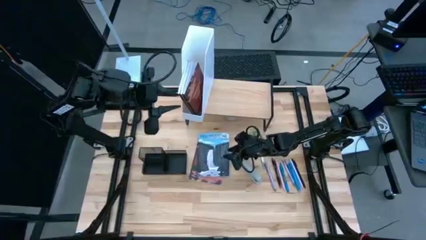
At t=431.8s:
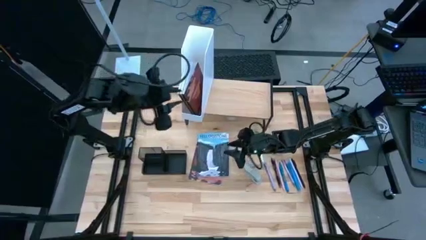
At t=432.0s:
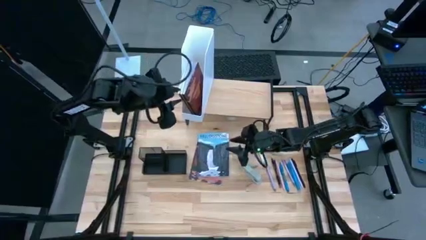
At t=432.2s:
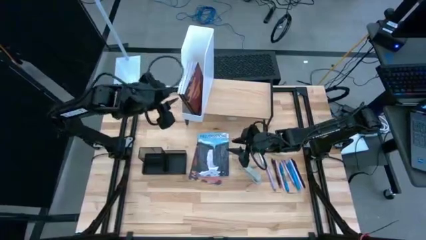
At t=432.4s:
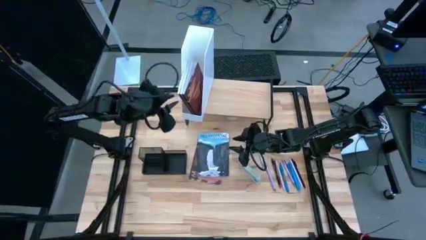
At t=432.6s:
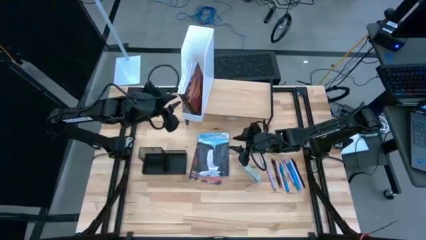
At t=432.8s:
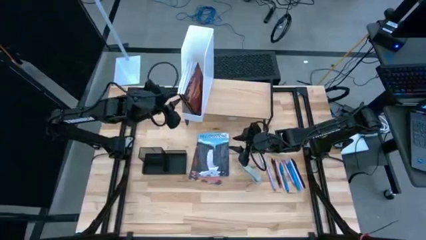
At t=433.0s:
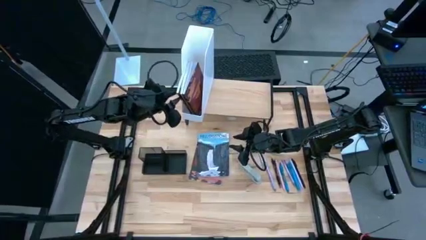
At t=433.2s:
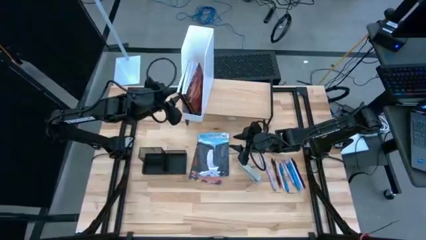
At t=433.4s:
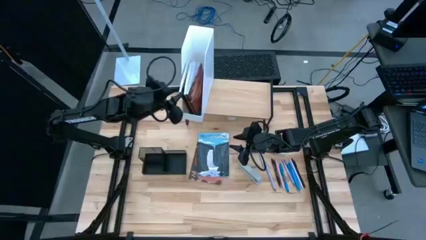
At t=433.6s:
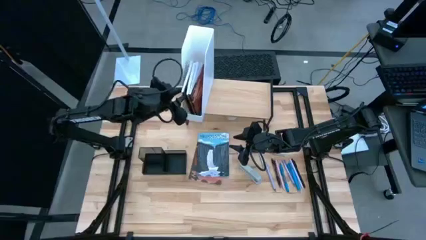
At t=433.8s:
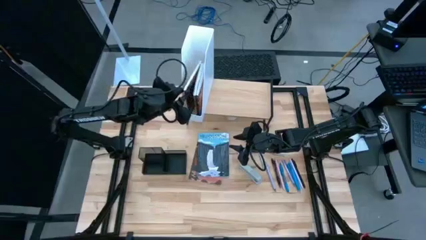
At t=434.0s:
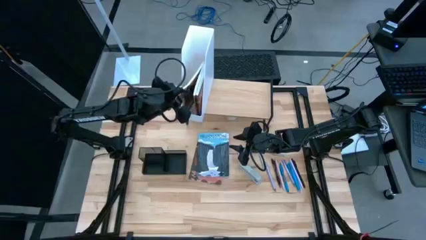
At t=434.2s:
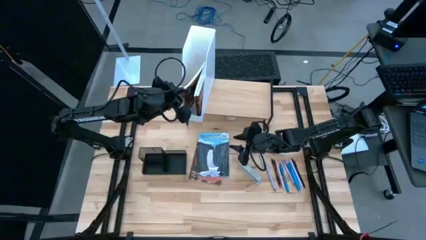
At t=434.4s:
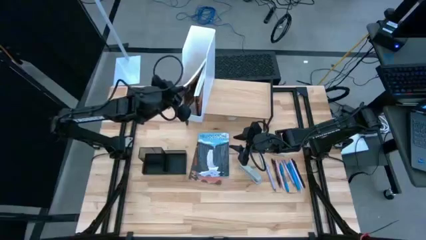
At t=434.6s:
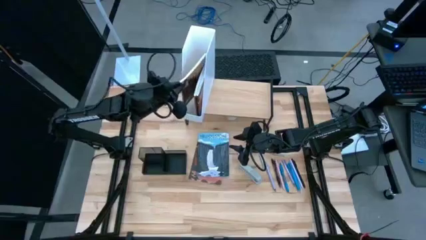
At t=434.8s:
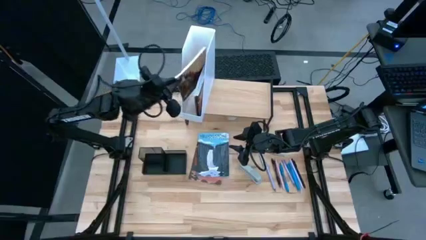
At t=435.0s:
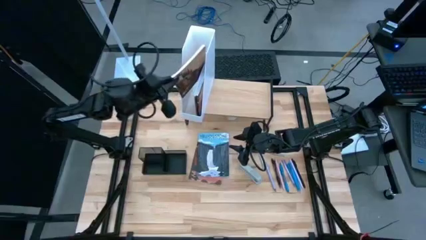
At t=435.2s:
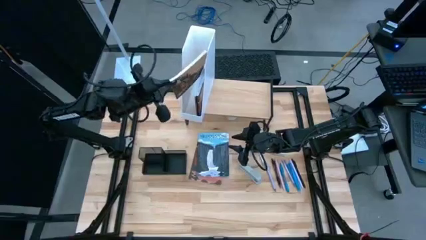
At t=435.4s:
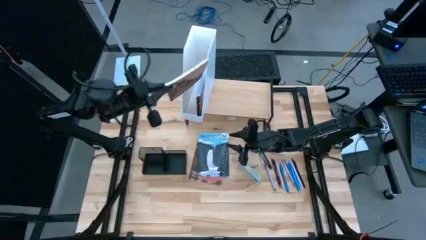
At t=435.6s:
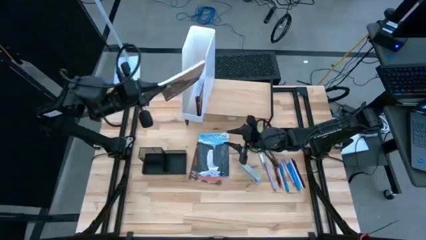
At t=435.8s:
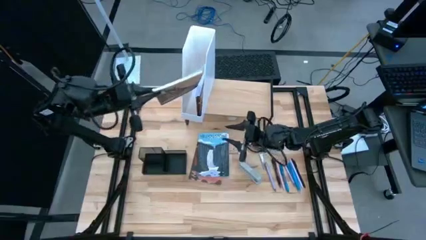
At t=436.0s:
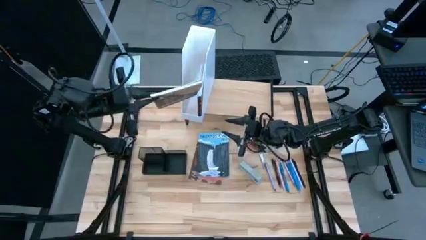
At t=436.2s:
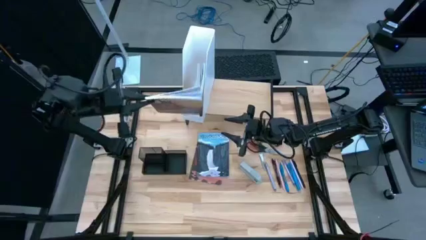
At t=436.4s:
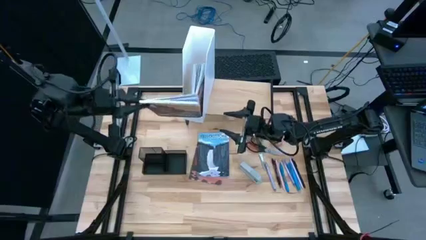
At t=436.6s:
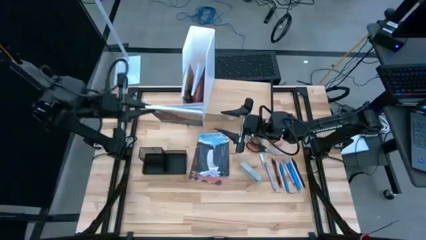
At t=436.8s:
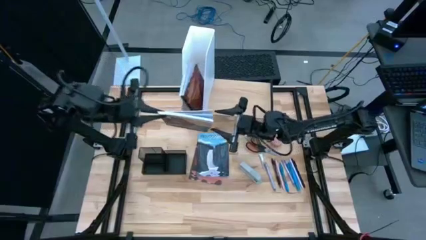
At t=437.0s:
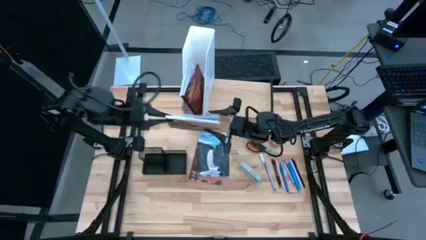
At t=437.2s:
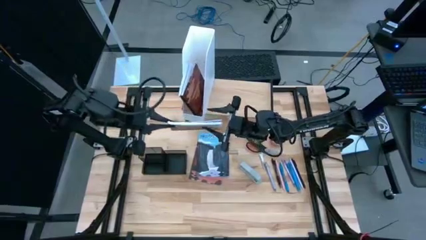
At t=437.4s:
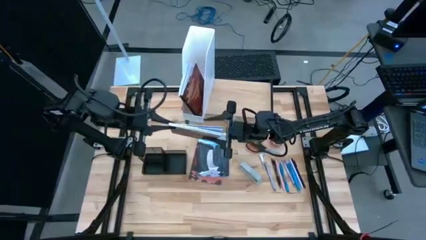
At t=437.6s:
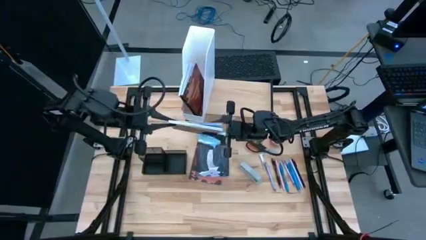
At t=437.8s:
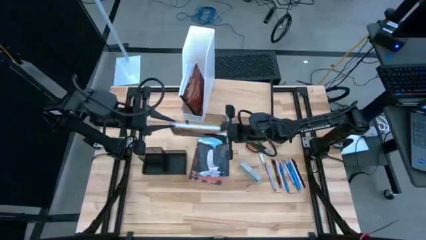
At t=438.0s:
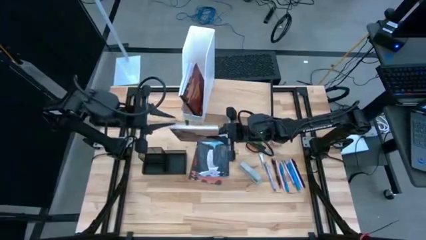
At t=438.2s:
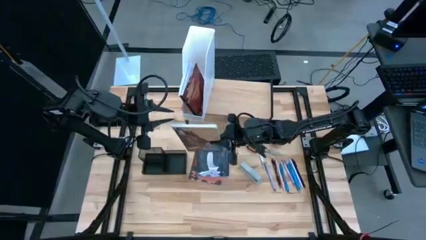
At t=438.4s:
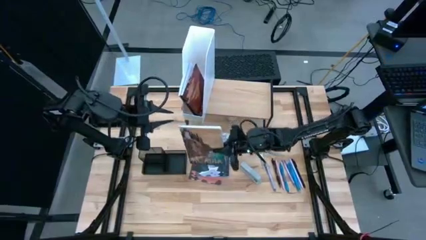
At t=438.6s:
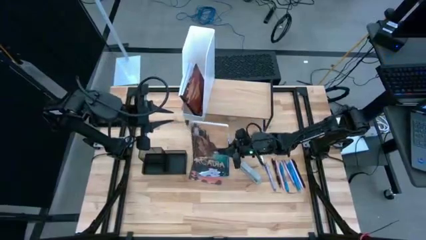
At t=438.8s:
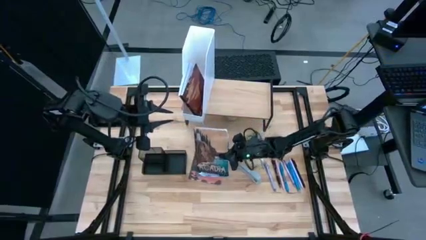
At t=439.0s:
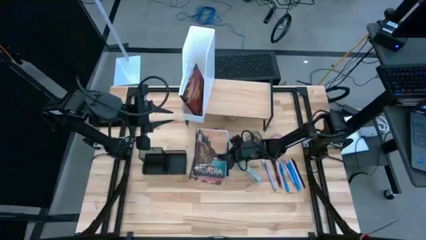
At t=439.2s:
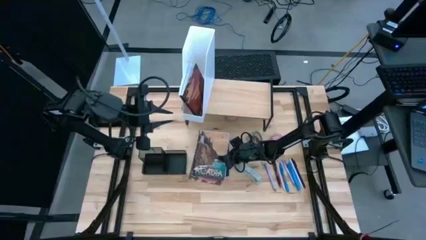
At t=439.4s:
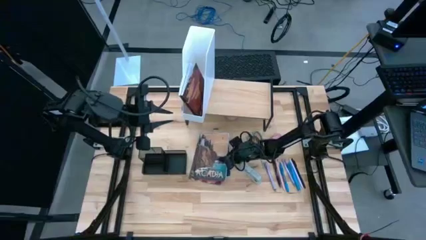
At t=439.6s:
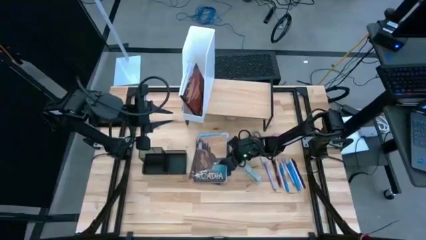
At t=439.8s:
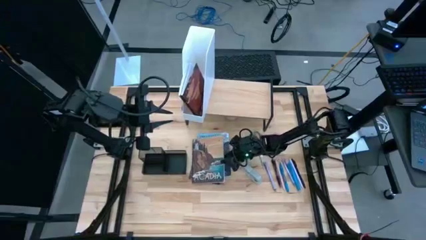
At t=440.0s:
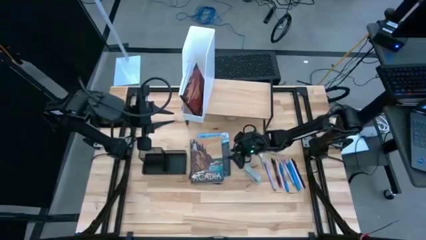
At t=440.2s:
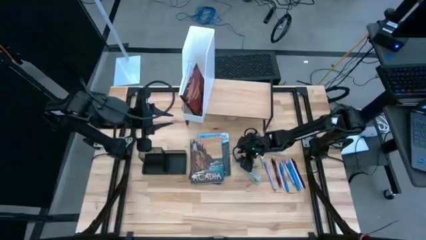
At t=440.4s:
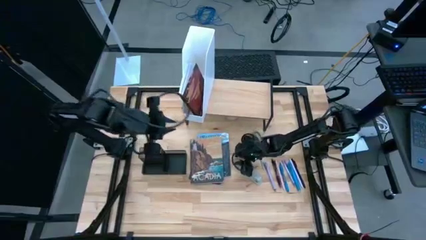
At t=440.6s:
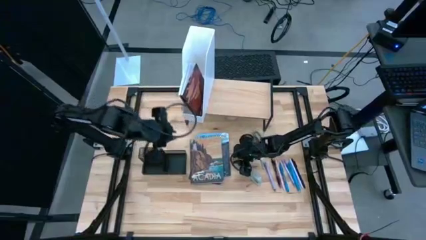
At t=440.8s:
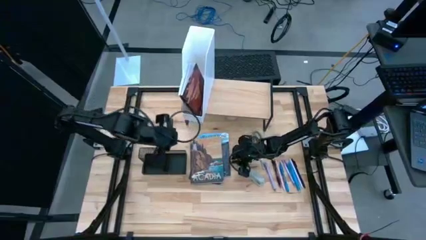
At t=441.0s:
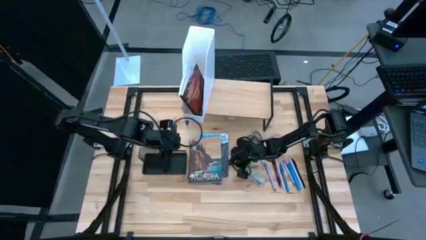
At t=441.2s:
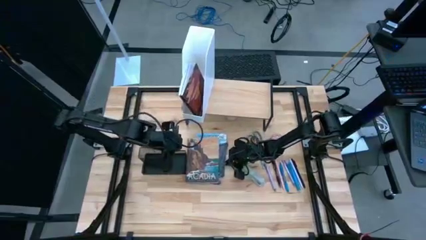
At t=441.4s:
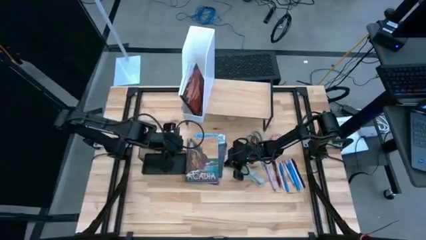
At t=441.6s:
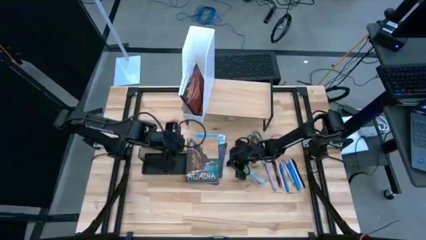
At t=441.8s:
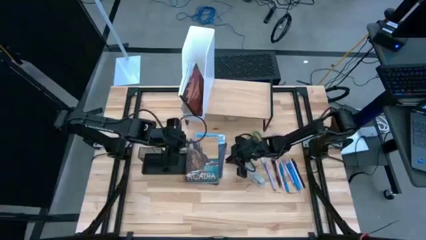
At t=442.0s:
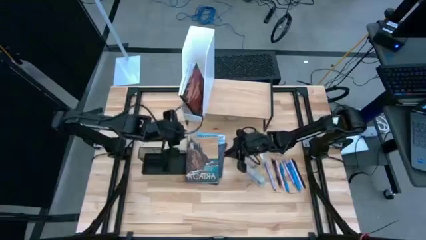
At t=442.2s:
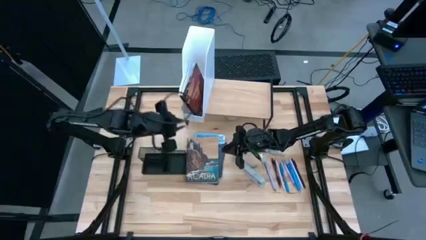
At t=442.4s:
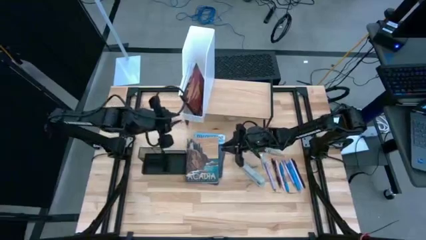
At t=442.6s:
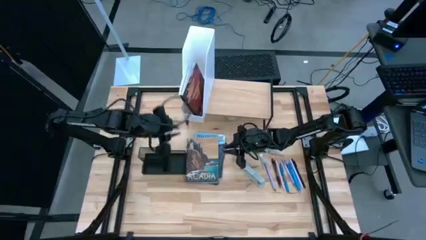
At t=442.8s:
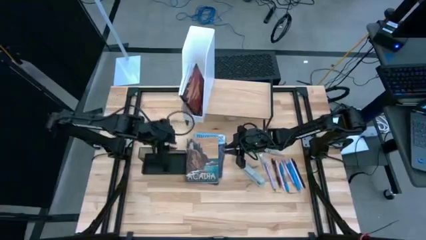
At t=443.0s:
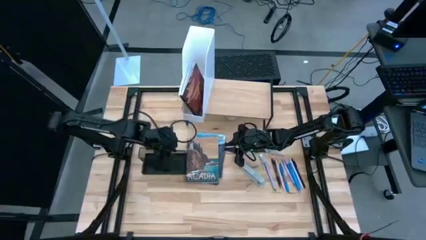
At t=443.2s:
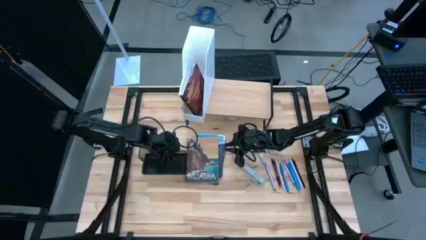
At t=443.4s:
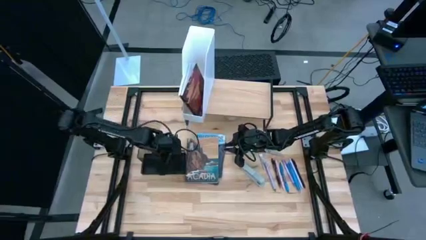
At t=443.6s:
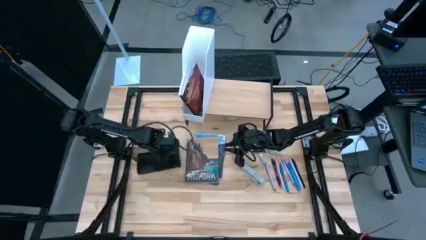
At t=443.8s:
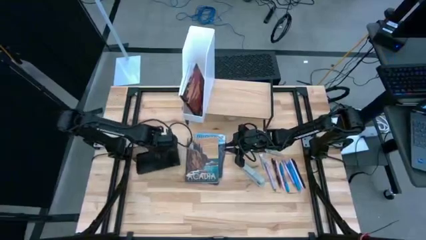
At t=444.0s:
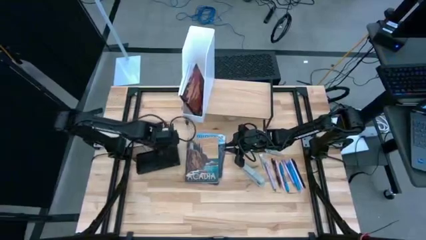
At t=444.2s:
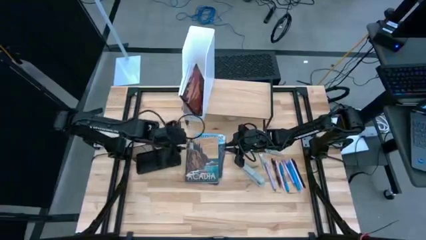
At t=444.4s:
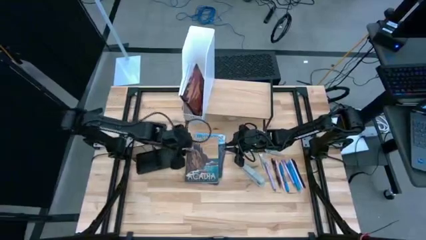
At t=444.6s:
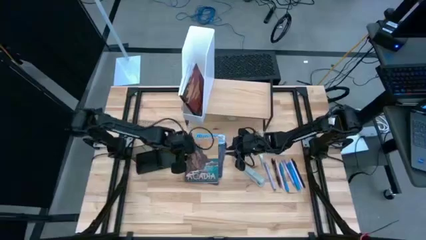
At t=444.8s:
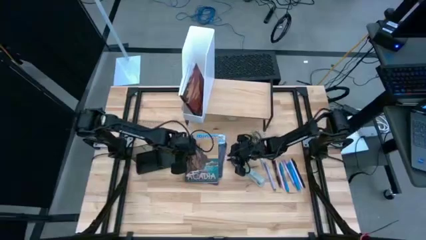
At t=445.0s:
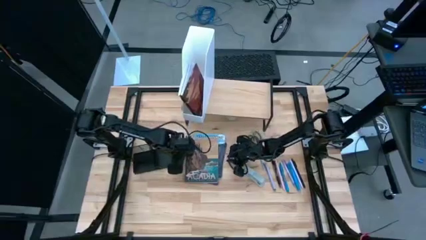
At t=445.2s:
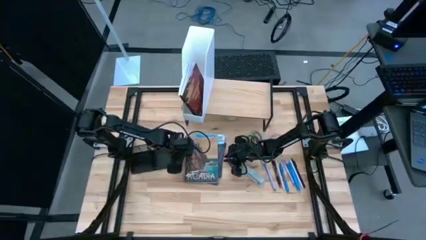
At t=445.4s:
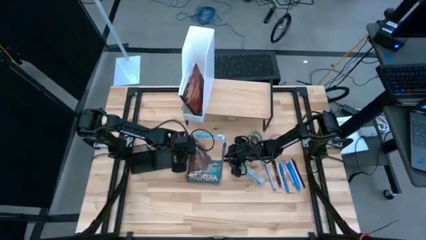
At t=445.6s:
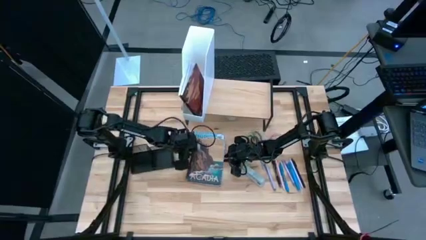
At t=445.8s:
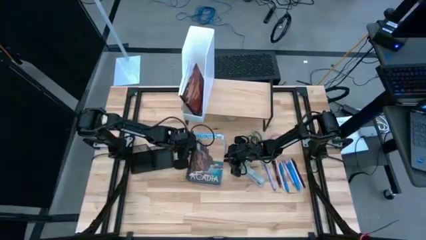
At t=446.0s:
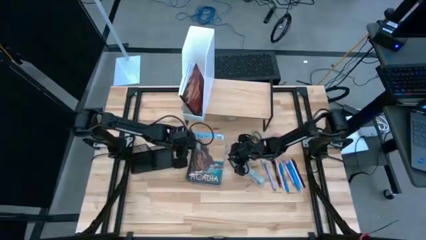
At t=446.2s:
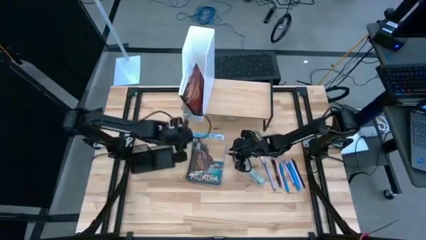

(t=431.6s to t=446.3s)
Task: Stock shelves
Remove the brown book from the white bookshelf on the shelf
